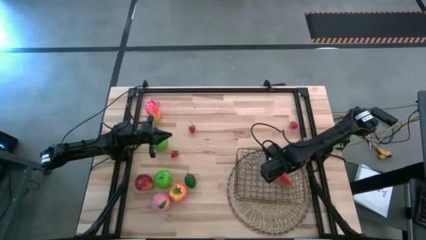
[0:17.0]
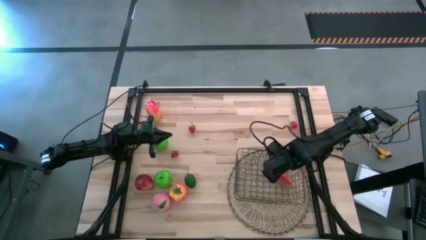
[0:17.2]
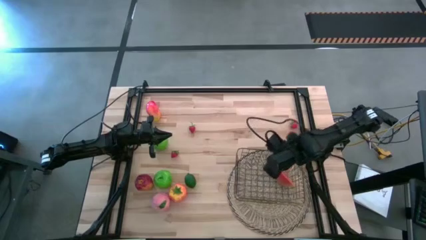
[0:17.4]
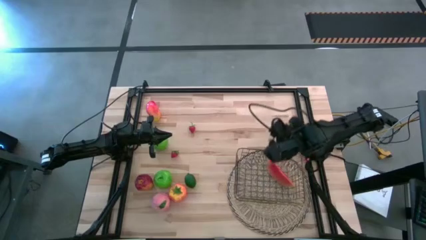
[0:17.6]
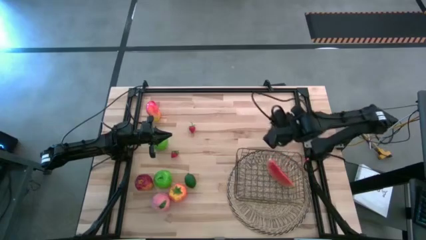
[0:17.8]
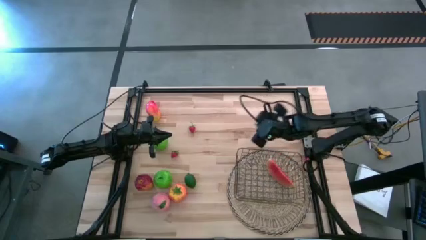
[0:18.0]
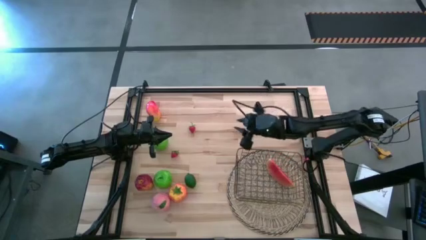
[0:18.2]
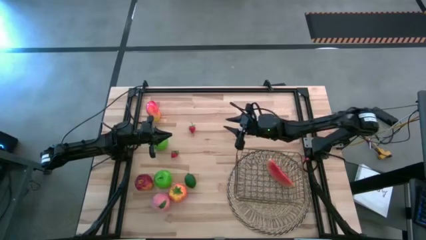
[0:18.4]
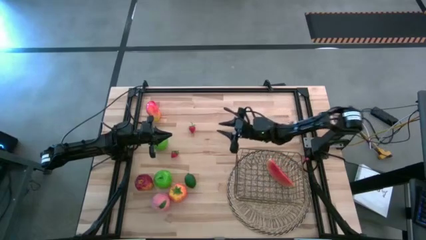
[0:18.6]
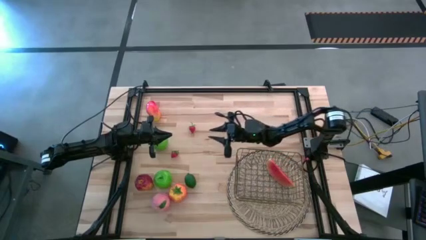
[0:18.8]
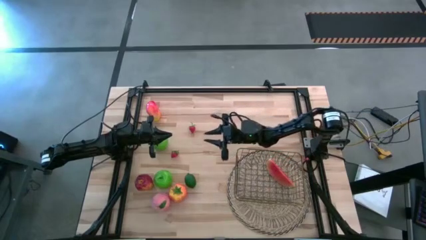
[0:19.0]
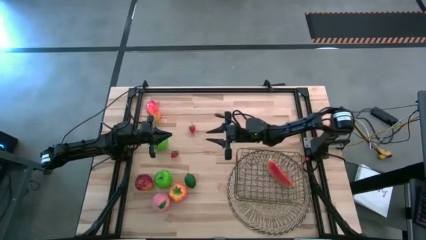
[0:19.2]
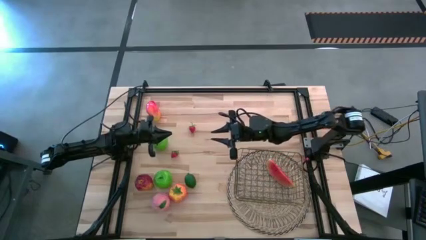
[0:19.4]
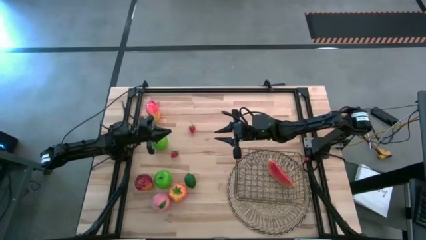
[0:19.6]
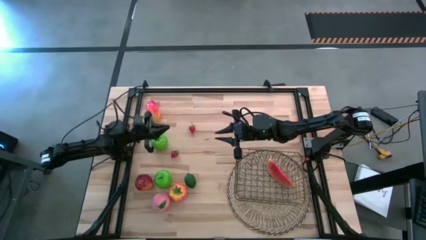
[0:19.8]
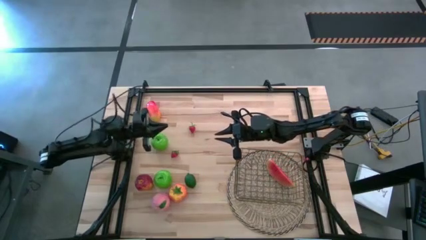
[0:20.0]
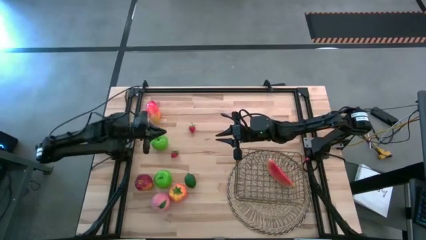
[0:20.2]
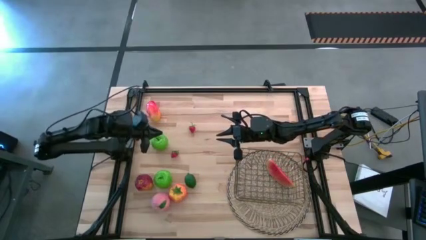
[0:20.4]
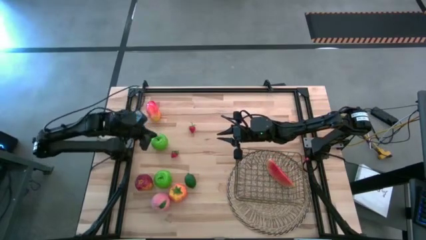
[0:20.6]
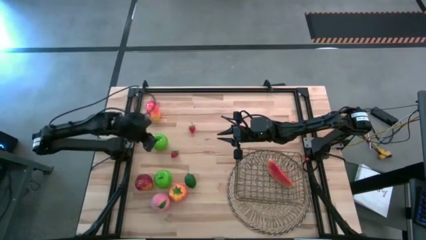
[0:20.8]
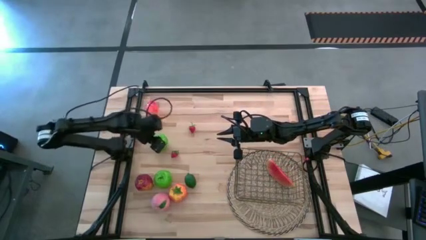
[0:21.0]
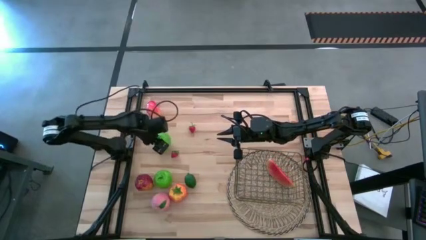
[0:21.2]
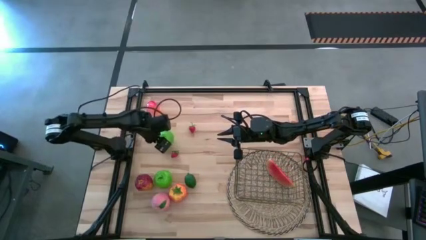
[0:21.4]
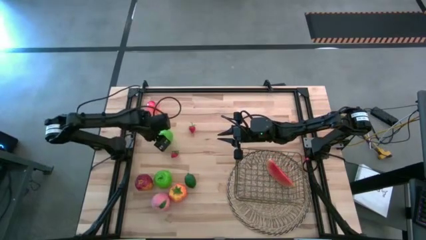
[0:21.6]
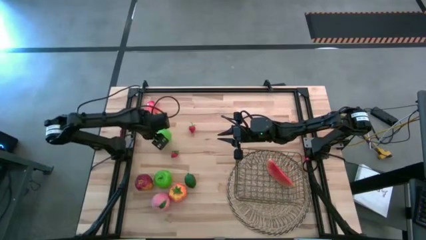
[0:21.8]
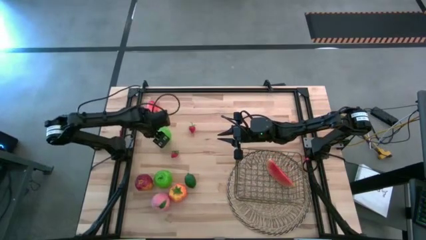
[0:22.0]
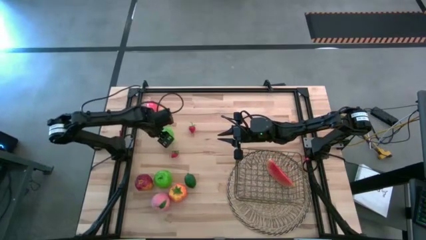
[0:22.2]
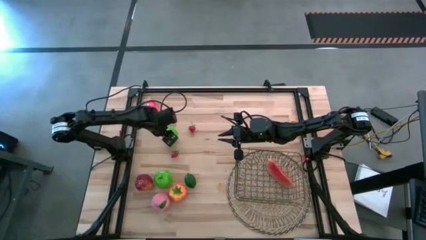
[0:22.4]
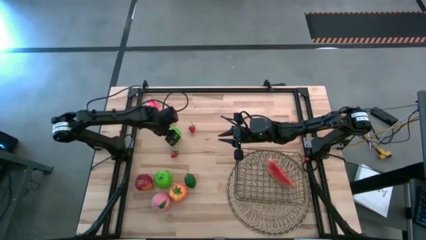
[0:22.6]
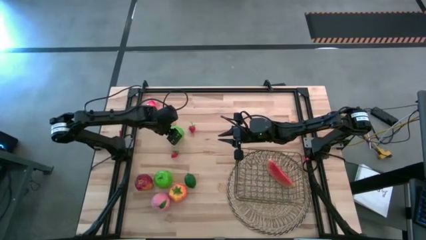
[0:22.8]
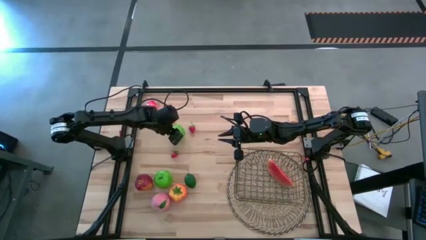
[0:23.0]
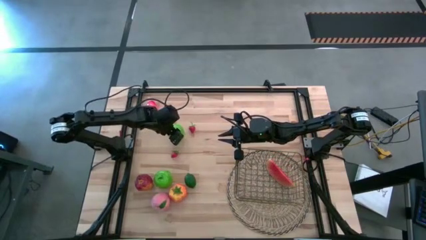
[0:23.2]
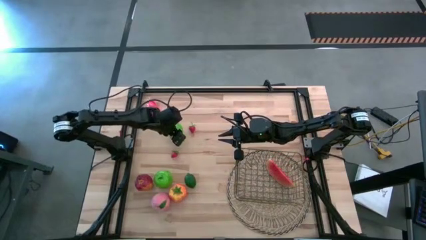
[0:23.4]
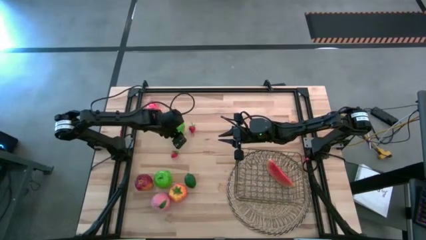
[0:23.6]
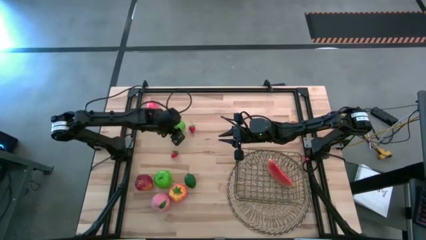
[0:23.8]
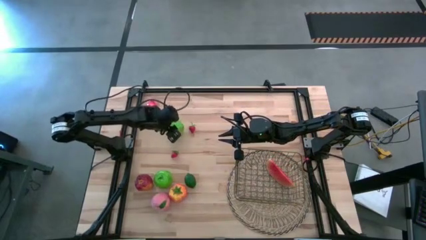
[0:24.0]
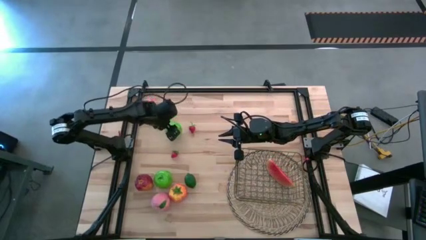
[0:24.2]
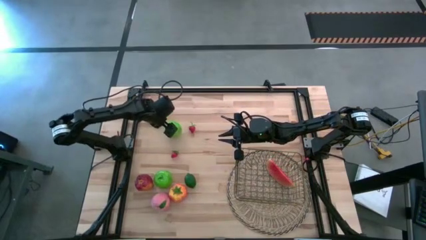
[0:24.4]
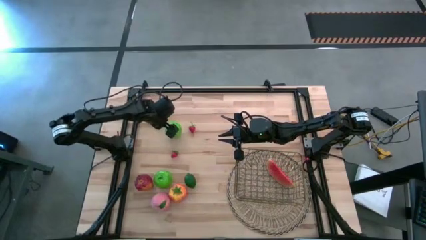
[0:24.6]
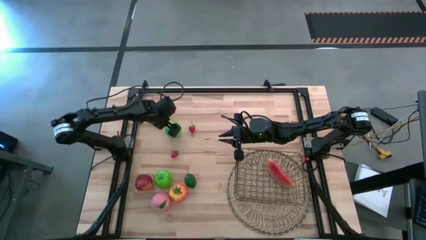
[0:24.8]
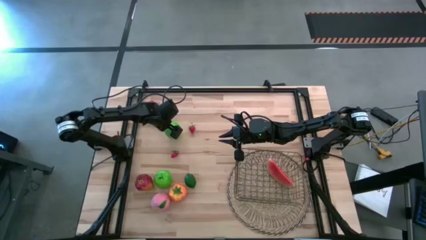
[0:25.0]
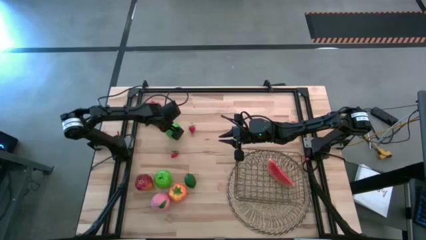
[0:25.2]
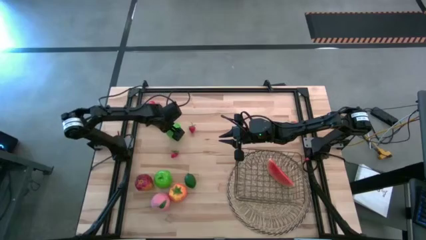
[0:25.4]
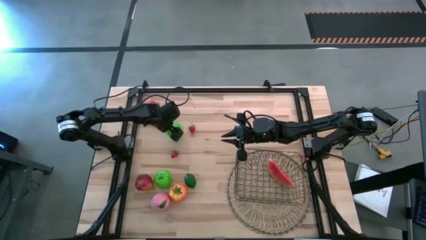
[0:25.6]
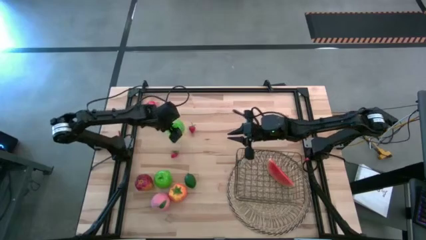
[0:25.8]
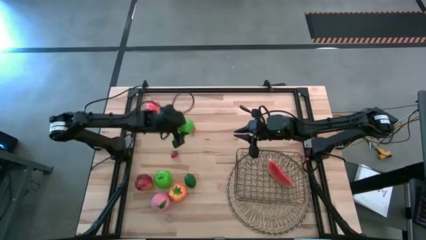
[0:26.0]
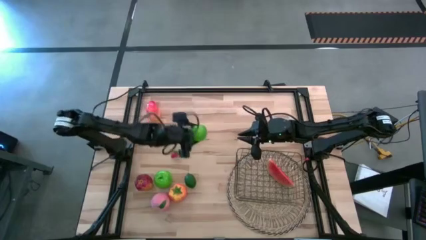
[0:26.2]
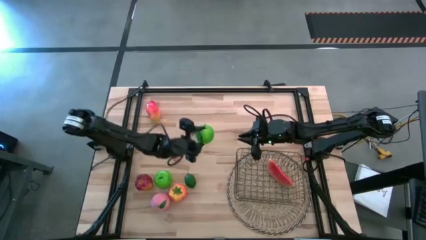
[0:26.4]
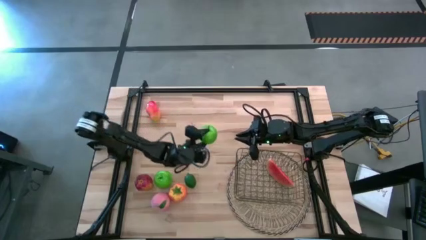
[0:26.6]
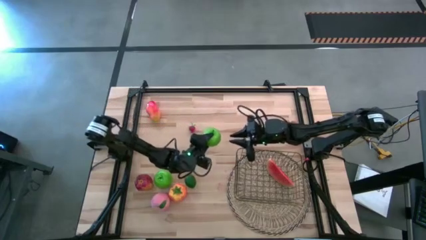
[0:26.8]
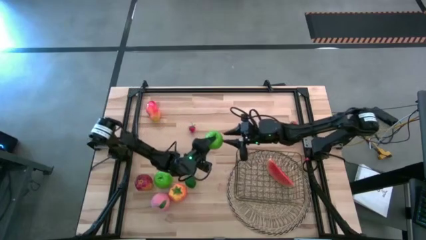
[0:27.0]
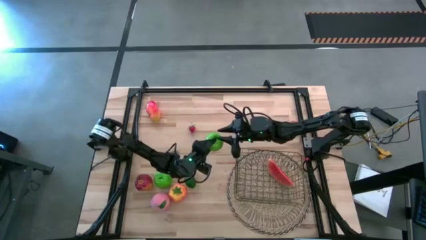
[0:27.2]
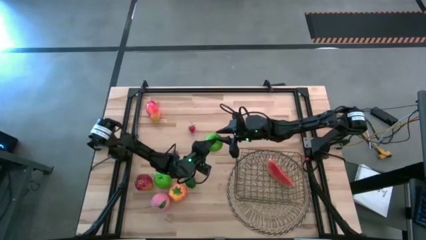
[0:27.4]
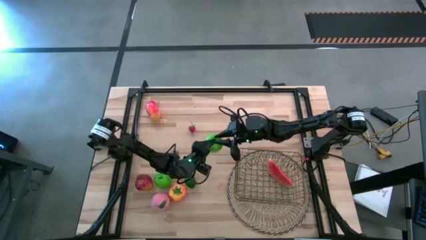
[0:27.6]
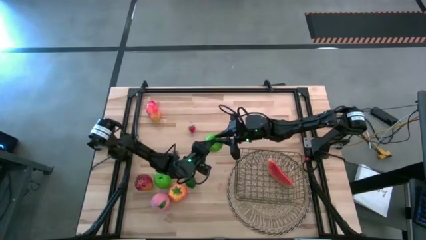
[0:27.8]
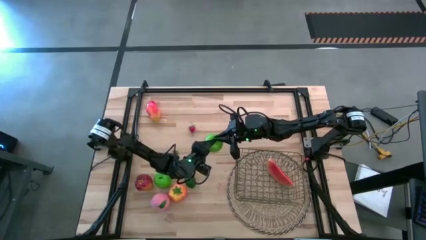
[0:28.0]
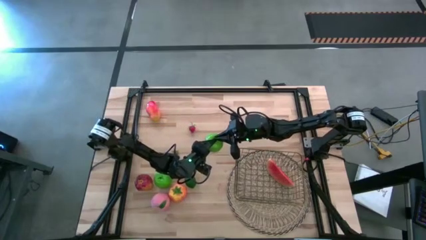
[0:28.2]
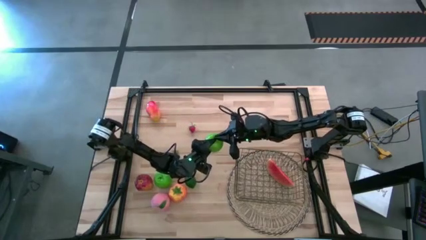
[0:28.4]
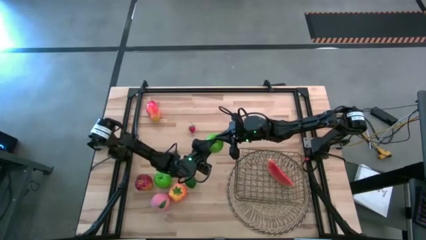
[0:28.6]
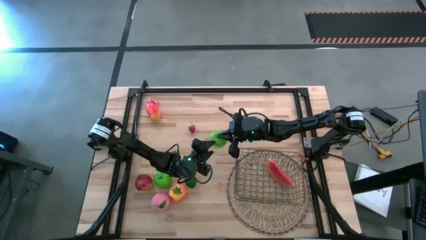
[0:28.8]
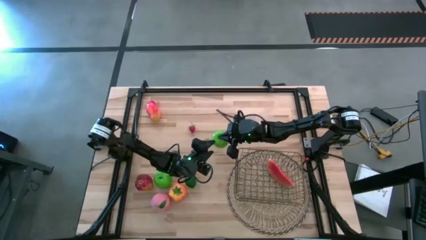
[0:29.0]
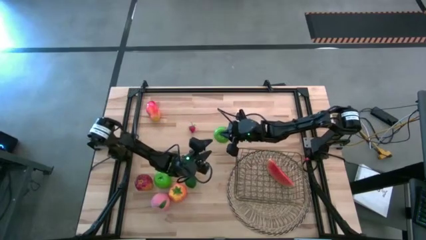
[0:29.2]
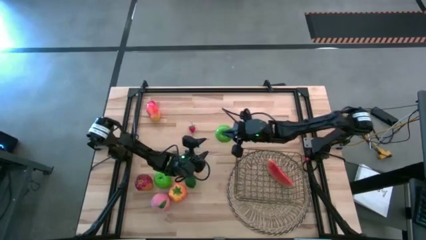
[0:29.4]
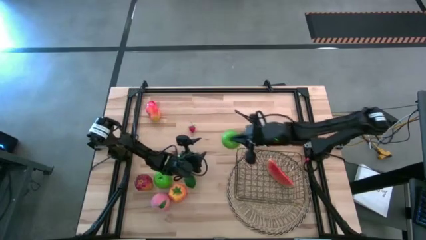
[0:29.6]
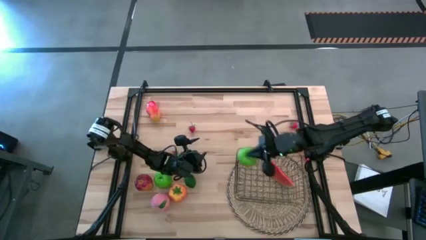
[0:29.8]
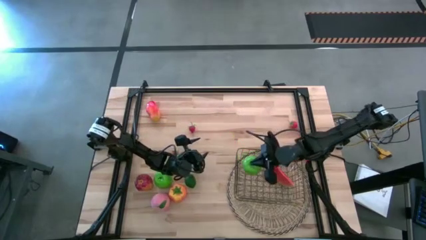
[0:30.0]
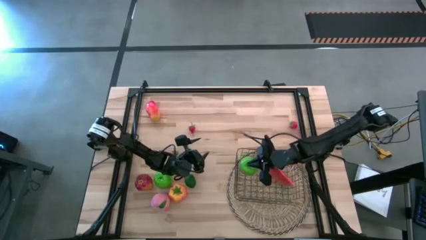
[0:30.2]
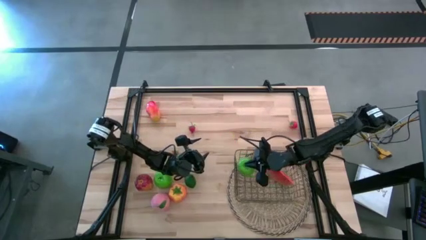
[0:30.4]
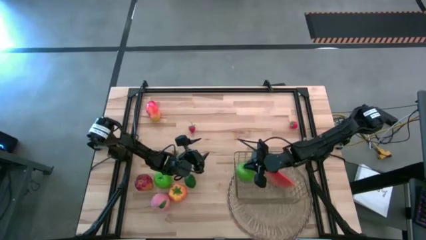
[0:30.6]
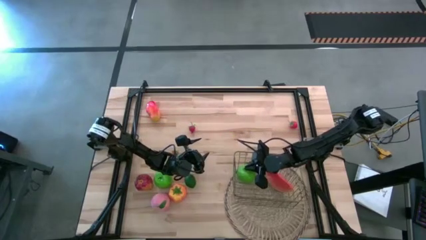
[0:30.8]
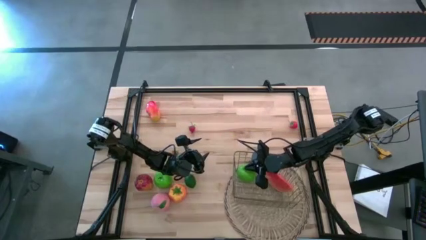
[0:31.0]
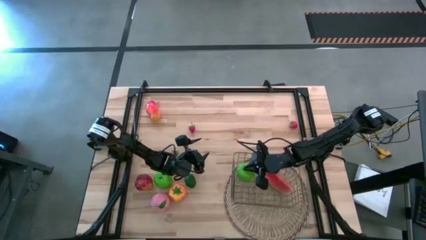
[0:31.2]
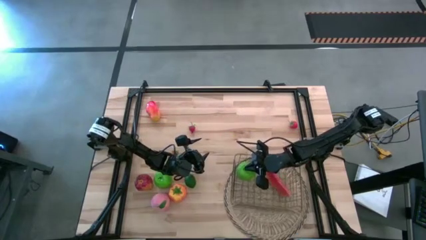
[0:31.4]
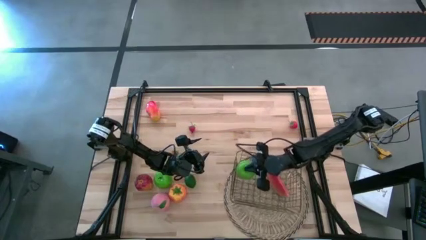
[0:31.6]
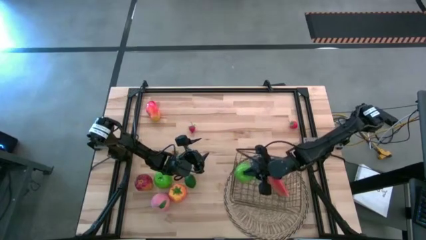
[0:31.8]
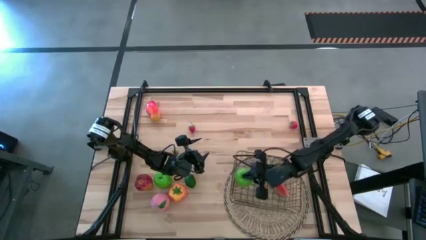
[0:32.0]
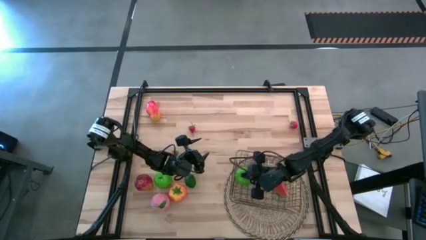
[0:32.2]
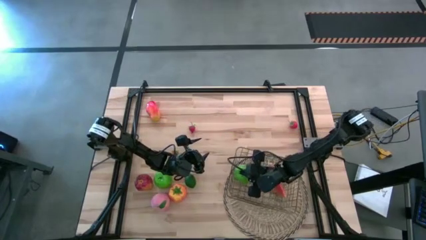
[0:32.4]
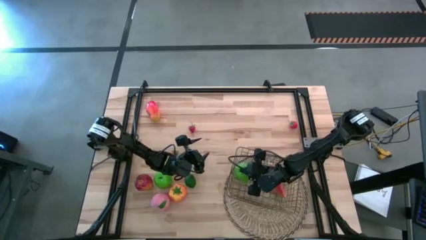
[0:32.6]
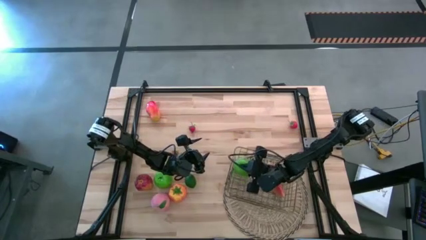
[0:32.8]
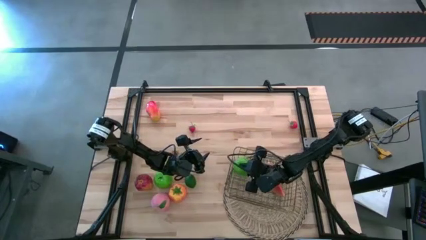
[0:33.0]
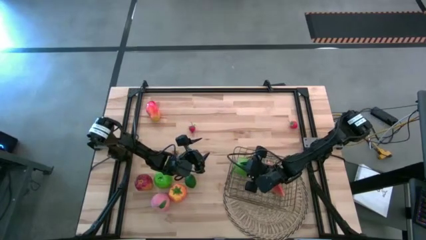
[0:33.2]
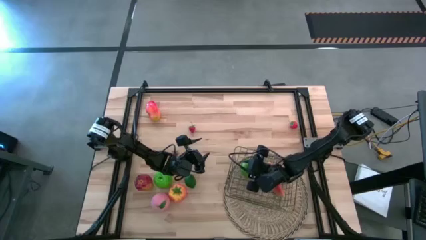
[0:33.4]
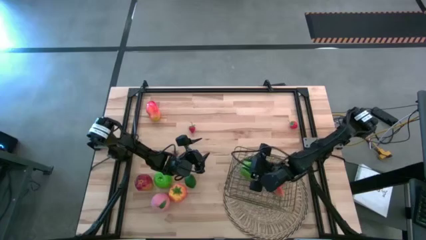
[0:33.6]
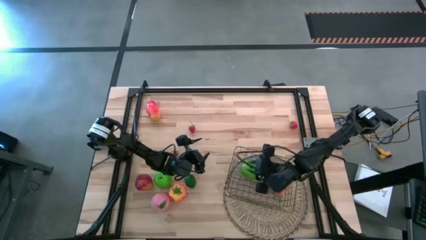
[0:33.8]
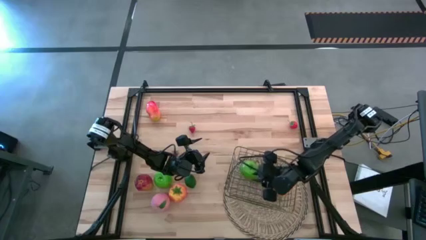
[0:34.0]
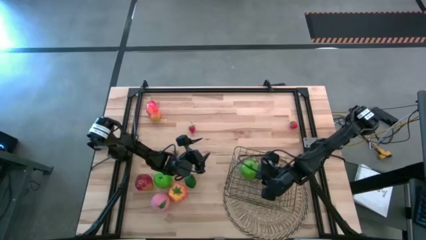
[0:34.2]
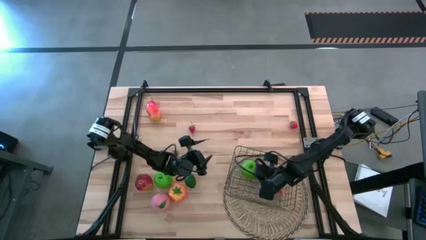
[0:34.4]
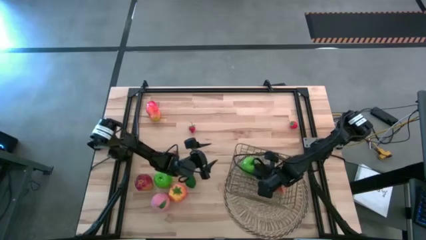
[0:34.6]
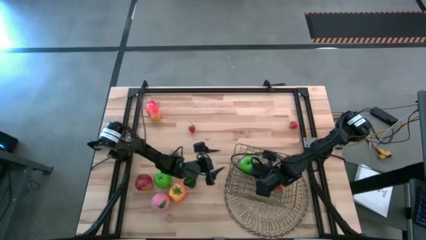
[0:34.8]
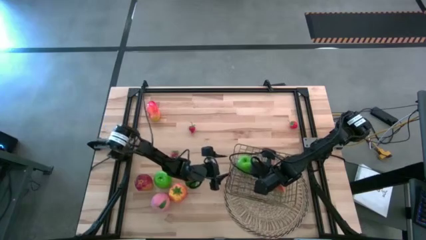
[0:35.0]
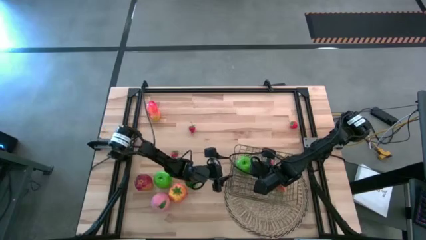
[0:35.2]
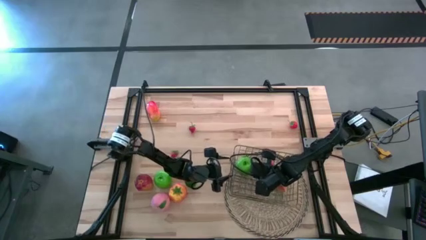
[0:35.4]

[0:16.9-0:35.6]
Task: Build produce basket
Put the top green apple into the wire basket
